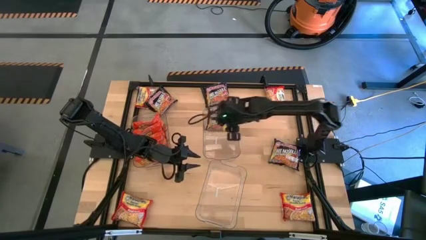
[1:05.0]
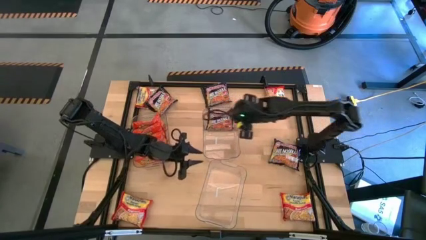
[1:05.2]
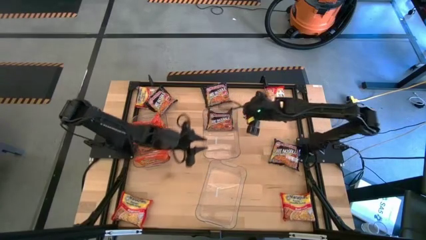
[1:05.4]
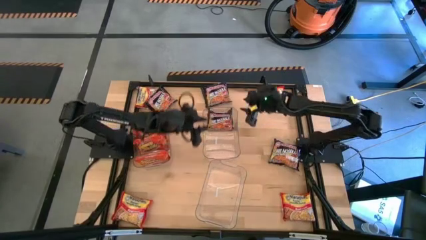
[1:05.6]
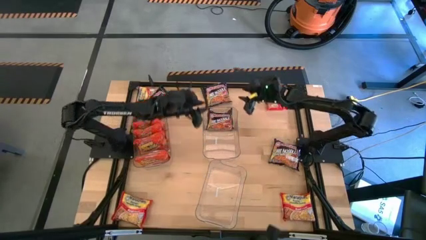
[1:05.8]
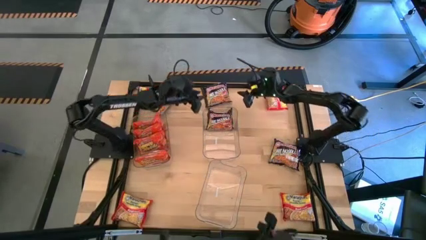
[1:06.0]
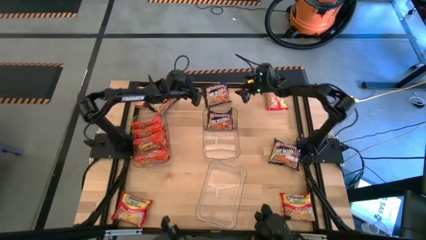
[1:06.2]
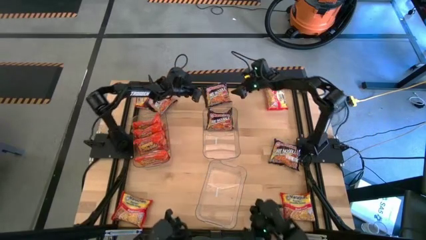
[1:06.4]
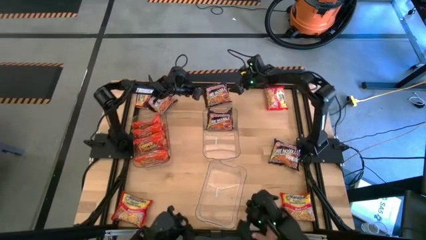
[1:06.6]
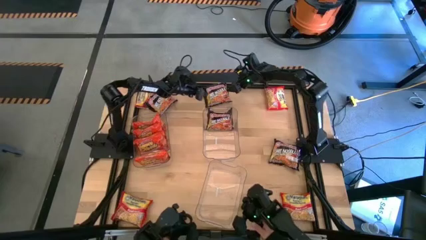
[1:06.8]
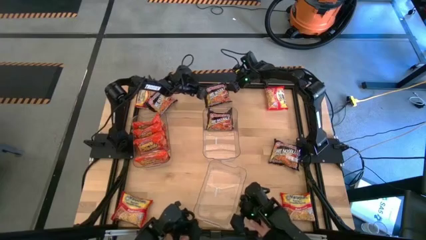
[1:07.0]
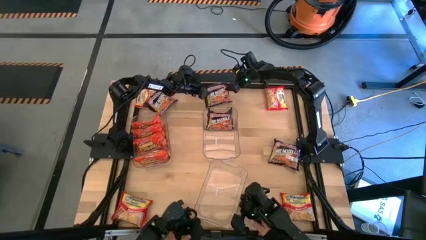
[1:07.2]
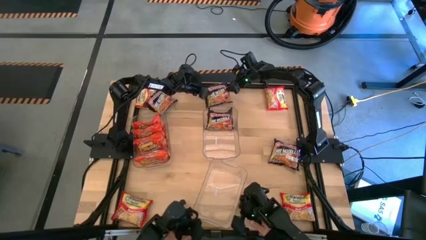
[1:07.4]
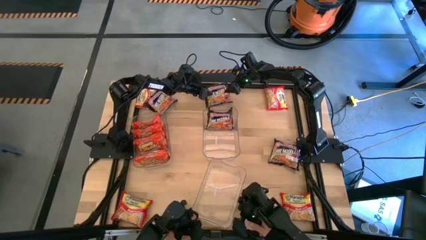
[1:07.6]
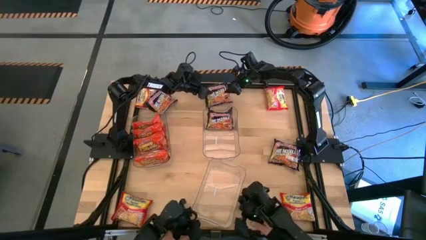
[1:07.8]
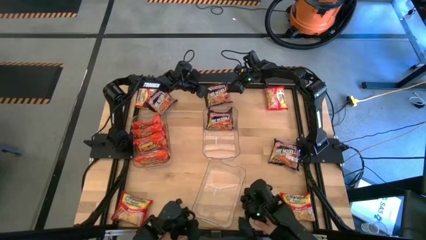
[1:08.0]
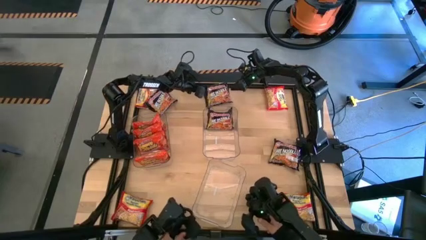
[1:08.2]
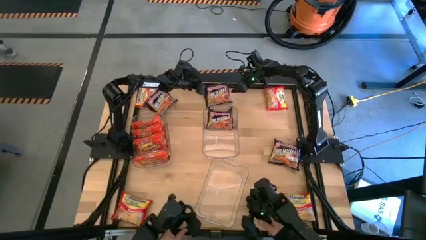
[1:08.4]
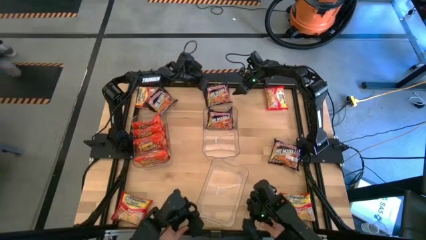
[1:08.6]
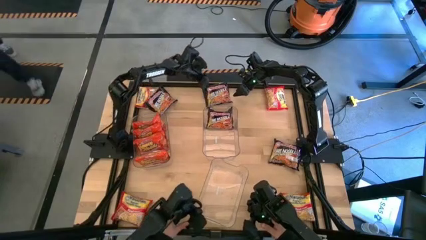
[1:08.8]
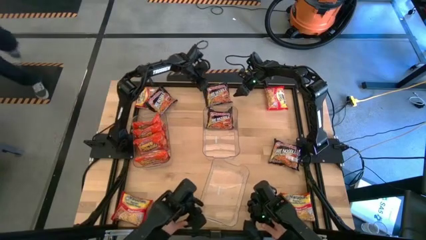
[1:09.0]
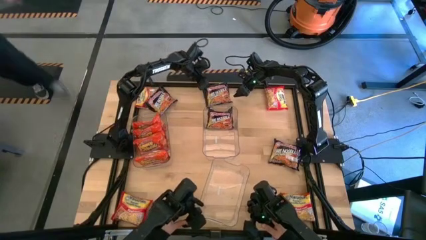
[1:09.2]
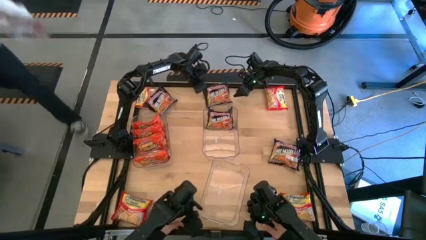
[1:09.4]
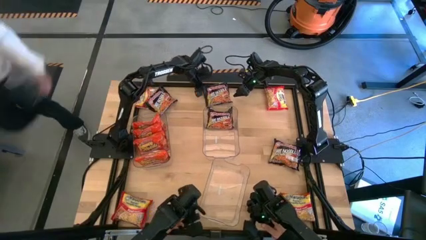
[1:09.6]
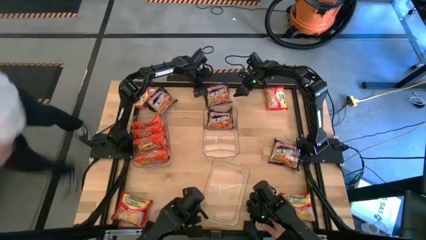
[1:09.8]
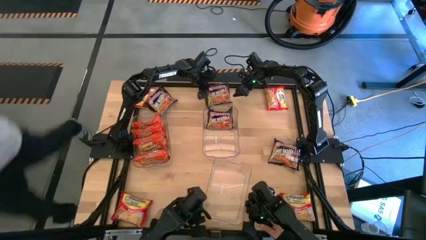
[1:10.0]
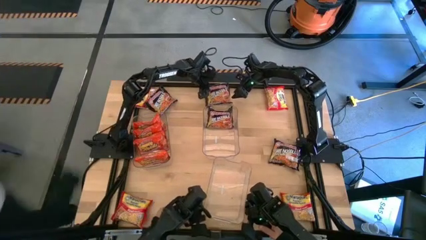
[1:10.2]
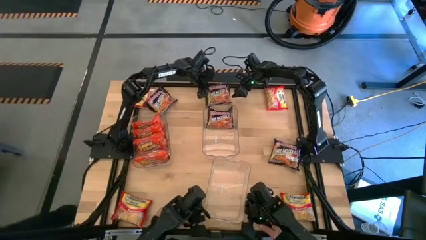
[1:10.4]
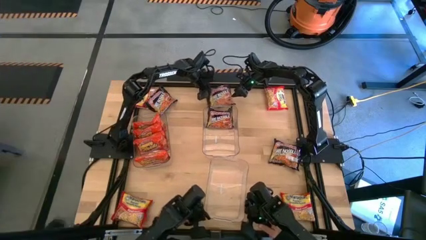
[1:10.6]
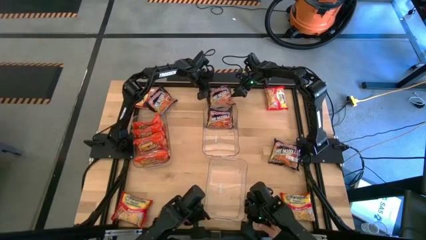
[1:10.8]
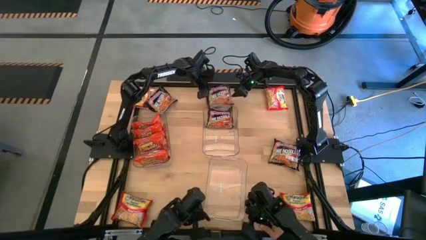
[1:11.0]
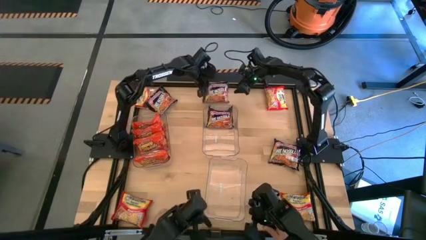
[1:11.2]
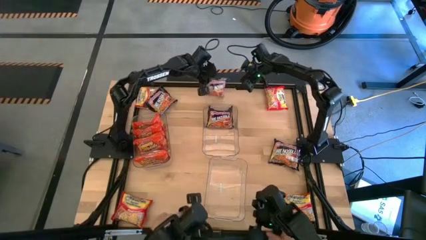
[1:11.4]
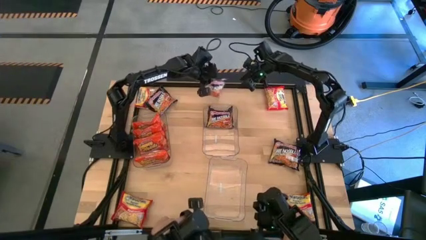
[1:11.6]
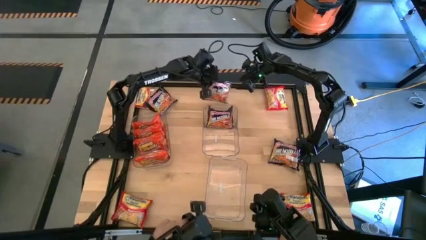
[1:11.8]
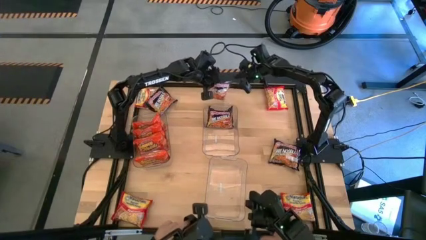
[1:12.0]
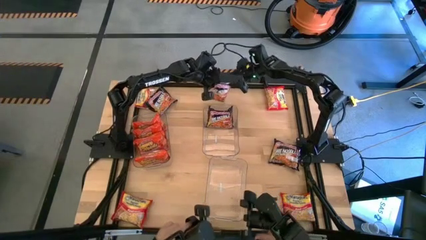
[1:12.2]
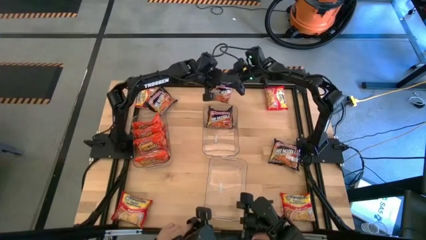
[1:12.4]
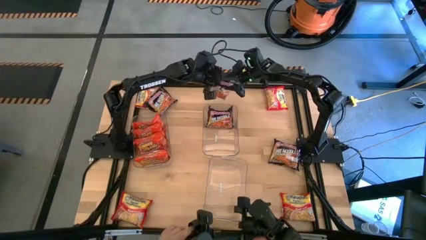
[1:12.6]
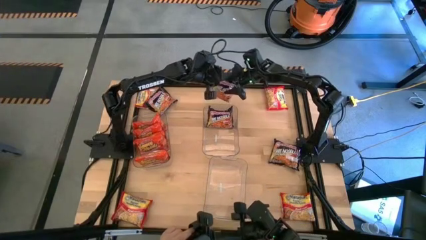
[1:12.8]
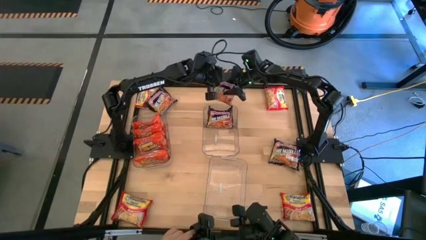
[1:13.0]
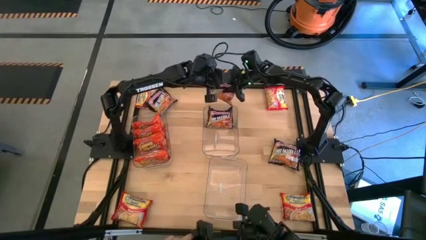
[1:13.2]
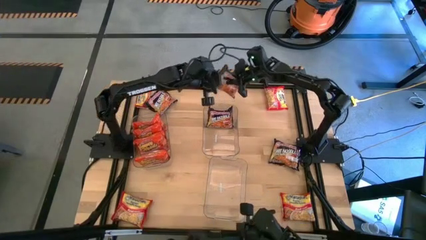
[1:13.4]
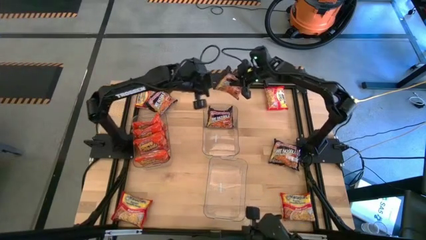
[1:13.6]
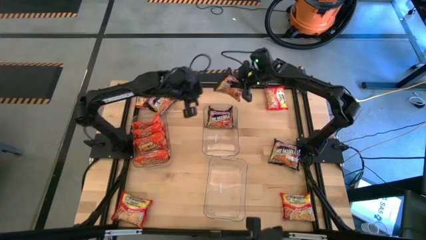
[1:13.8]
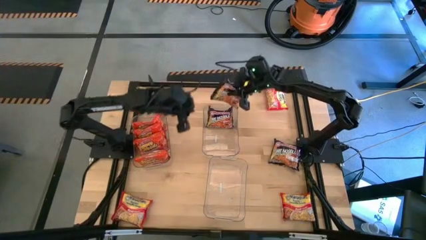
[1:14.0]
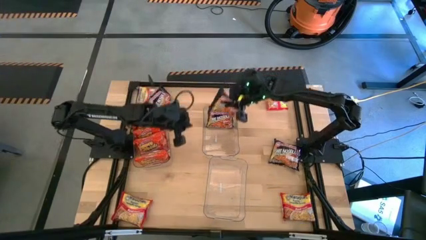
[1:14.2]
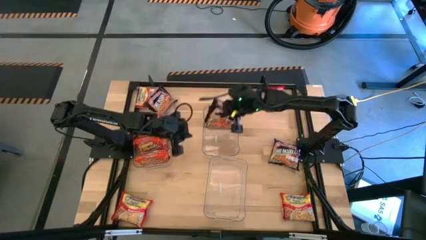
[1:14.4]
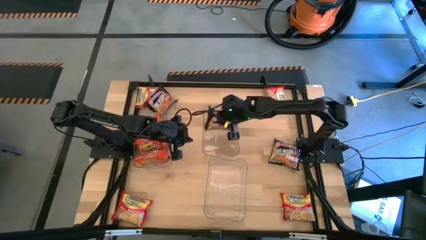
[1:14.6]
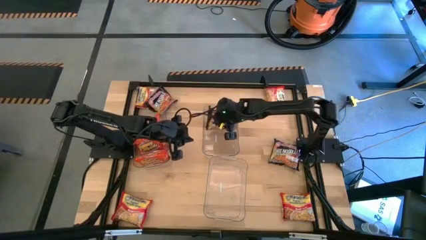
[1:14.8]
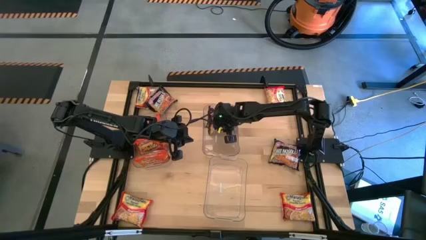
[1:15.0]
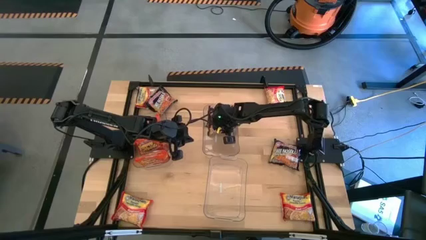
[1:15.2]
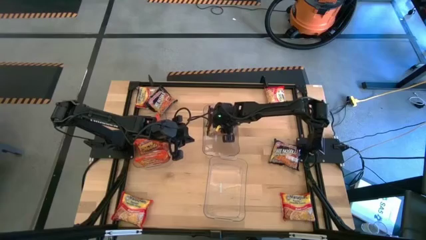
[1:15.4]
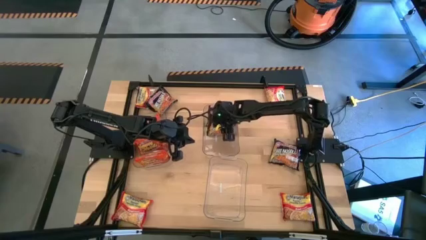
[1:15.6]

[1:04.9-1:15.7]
Task: Sort Maruchan noodles
Put the black noodle pack into the top right transparent bin

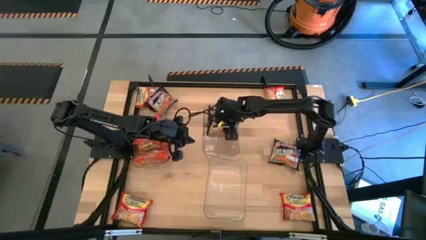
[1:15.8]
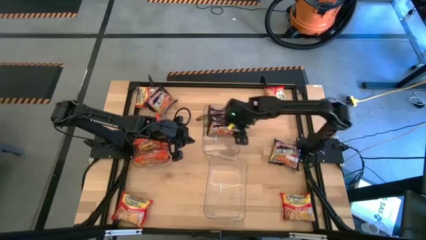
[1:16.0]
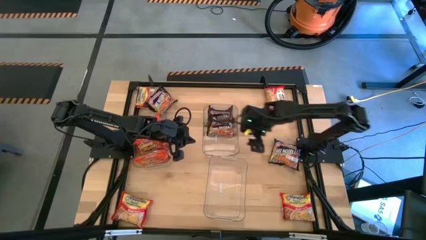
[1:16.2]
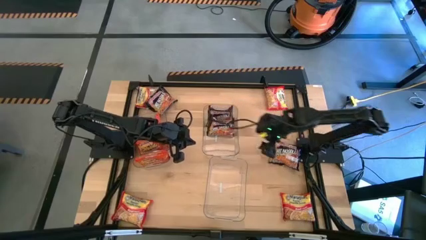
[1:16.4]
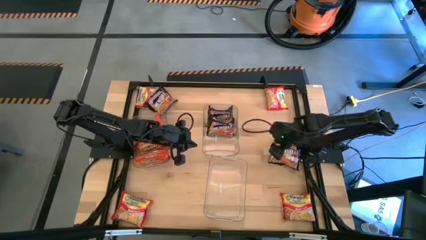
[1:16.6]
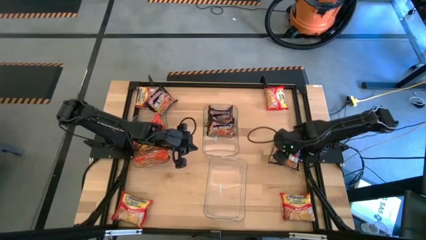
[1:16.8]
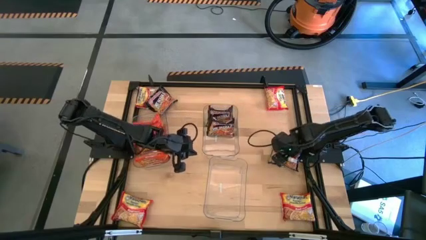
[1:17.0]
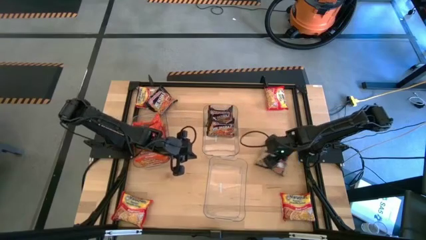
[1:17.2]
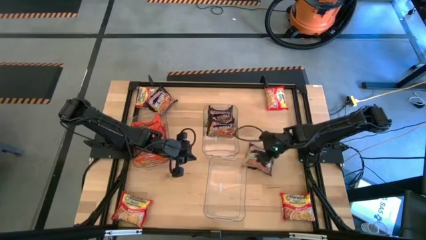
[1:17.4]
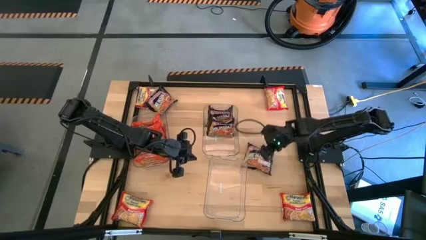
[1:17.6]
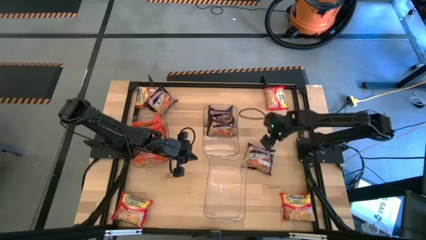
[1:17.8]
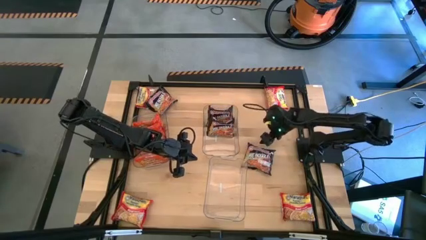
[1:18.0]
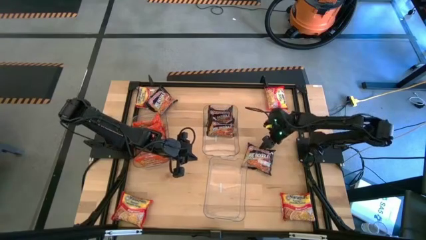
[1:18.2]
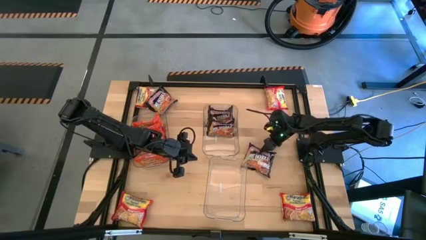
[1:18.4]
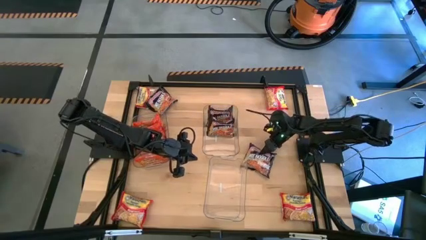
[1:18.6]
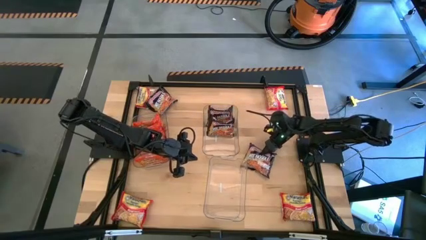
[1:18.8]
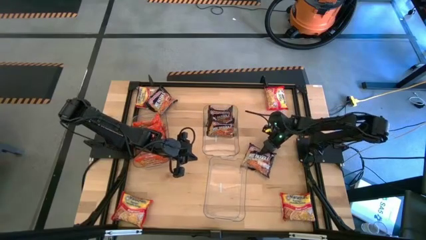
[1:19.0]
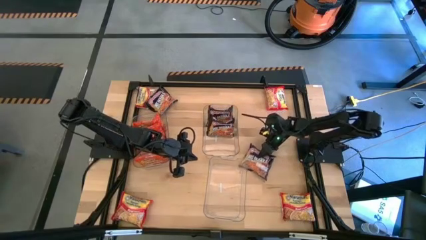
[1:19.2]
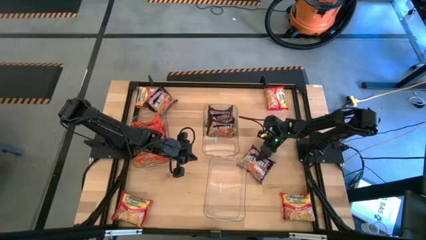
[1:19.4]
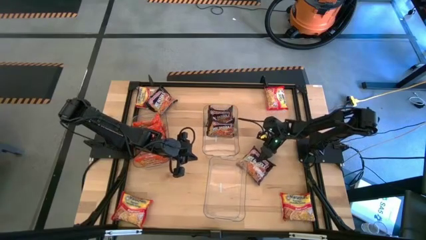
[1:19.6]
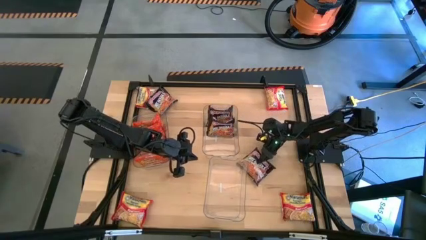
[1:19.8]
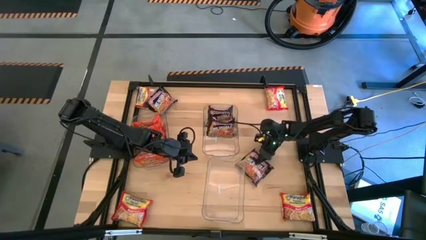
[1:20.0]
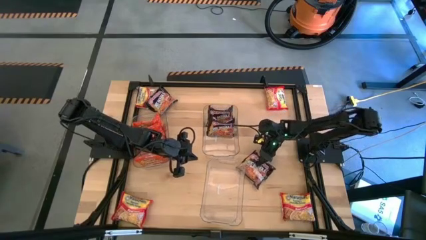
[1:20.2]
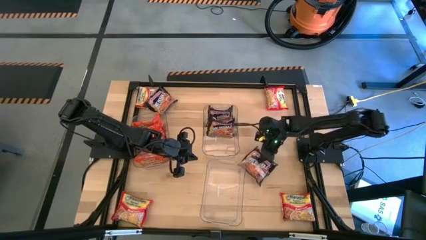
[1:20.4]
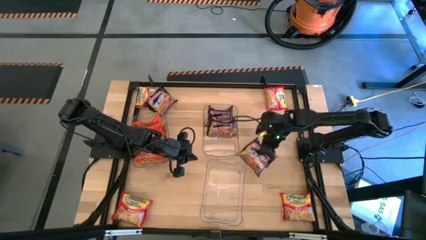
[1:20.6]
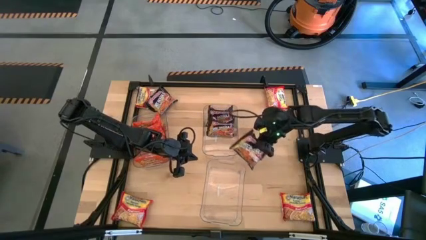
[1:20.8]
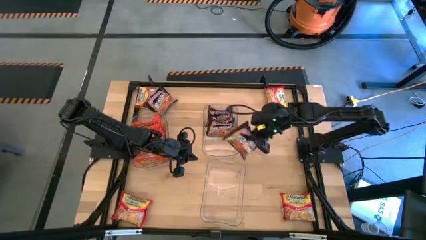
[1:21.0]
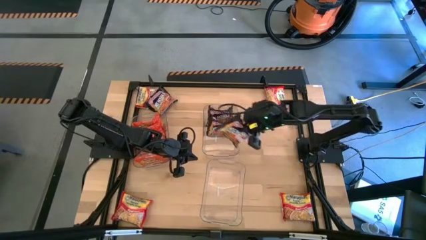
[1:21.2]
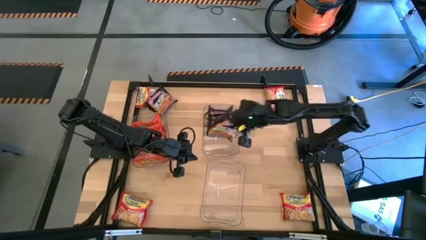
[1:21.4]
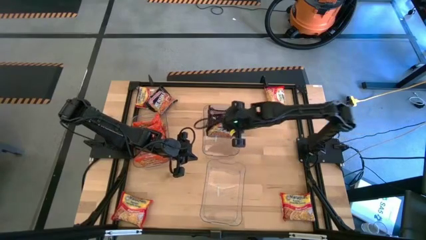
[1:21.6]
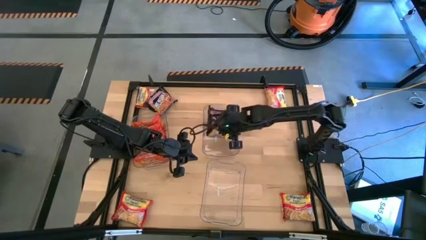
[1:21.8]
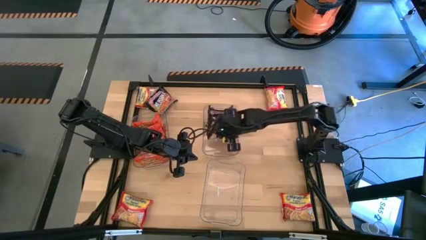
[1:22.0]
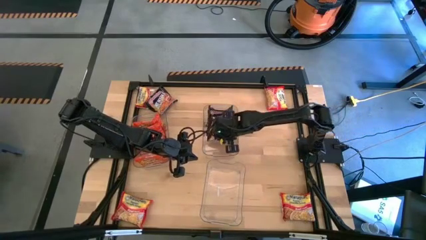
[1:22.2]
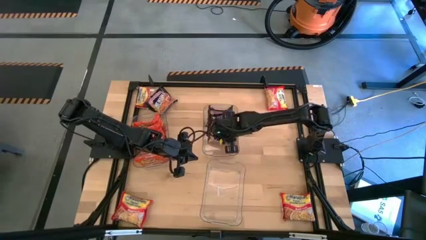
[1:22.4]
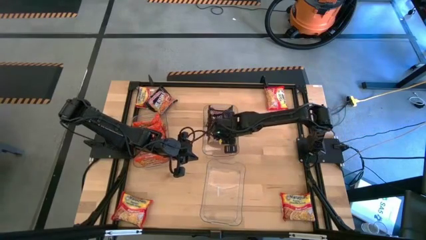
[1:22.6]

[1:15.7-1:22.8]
Put the black noodle pack into the top right transparent bin
